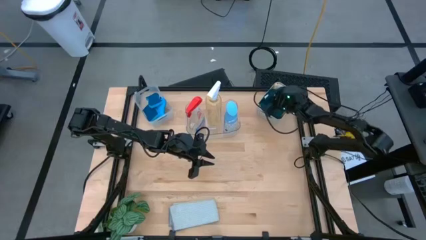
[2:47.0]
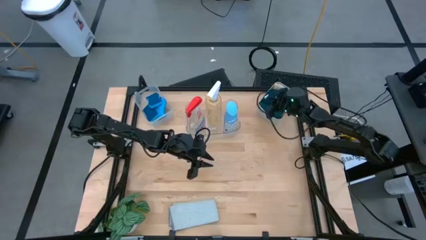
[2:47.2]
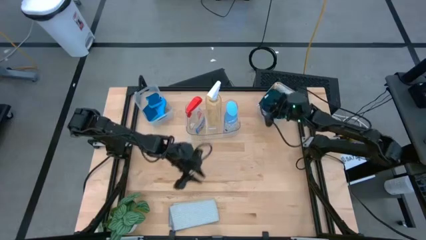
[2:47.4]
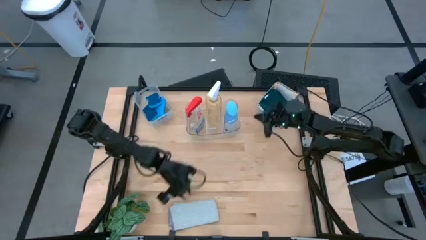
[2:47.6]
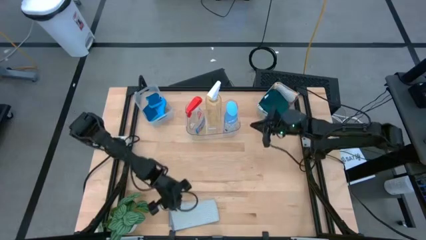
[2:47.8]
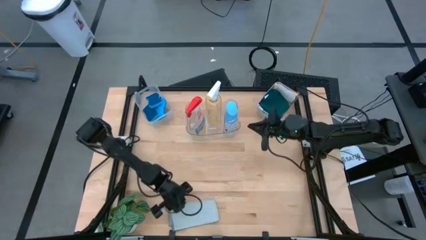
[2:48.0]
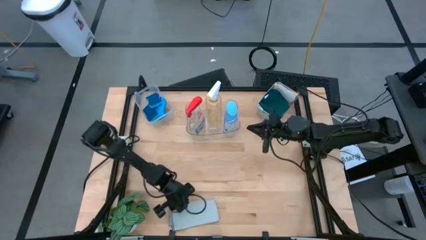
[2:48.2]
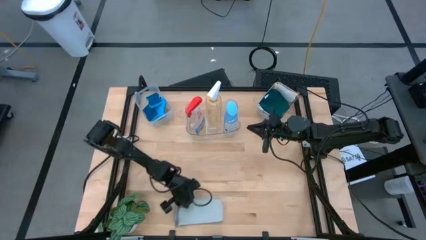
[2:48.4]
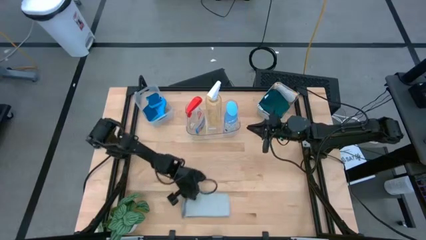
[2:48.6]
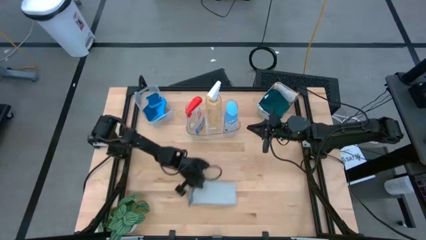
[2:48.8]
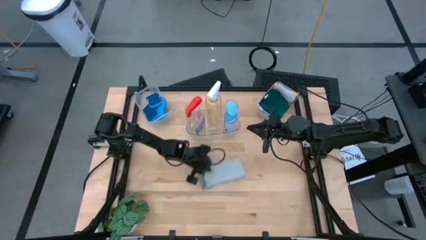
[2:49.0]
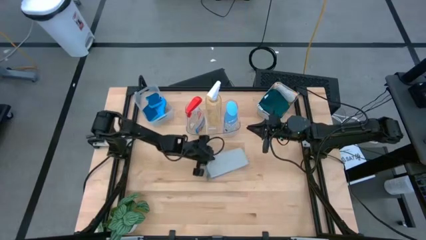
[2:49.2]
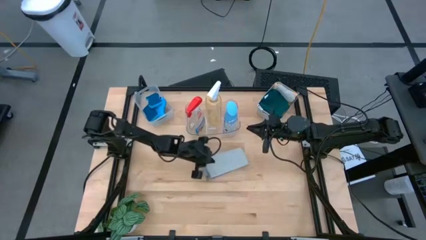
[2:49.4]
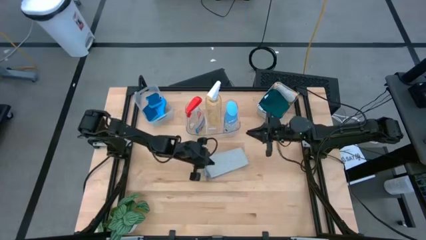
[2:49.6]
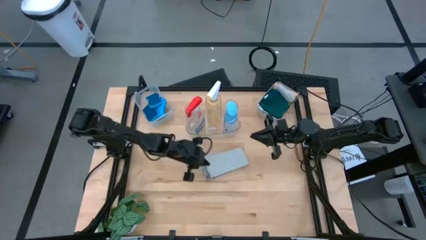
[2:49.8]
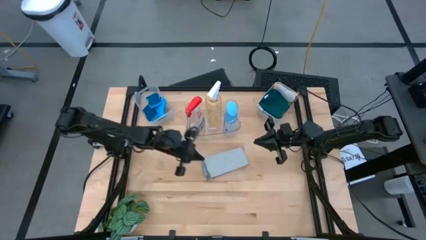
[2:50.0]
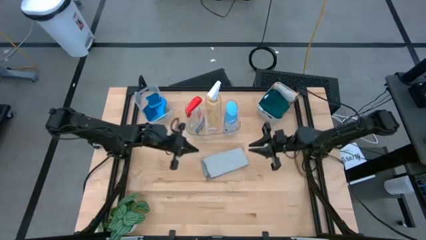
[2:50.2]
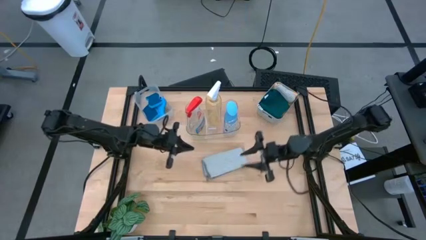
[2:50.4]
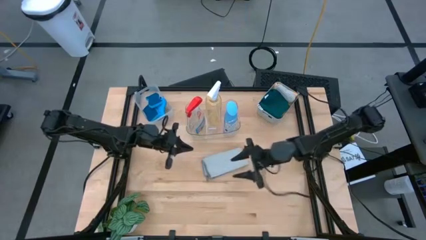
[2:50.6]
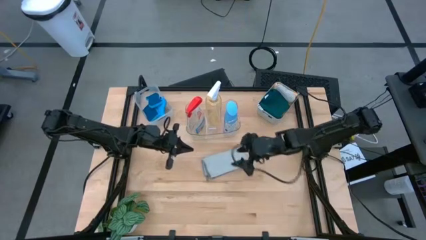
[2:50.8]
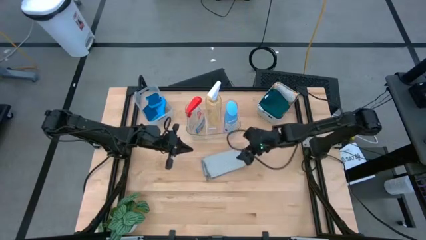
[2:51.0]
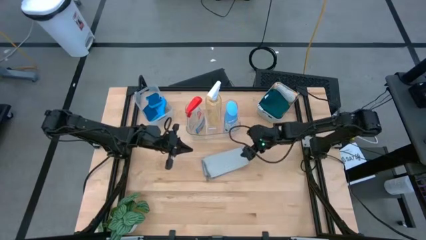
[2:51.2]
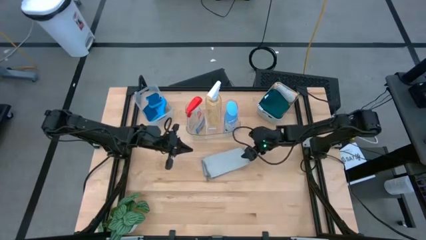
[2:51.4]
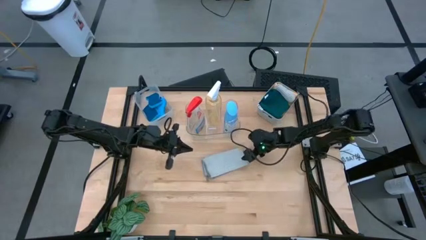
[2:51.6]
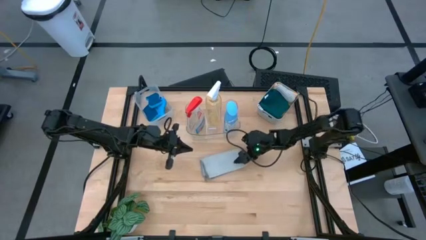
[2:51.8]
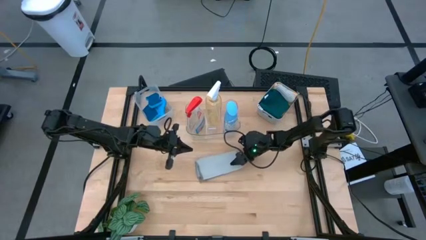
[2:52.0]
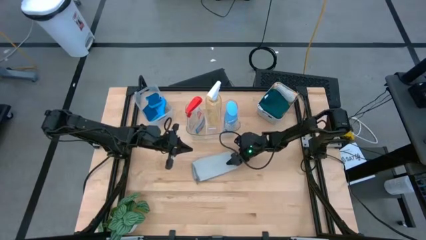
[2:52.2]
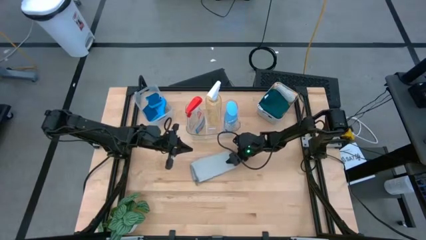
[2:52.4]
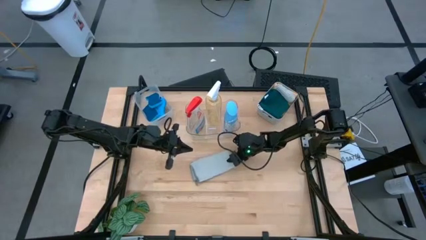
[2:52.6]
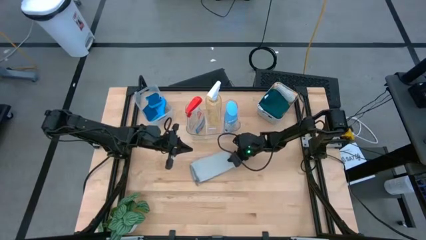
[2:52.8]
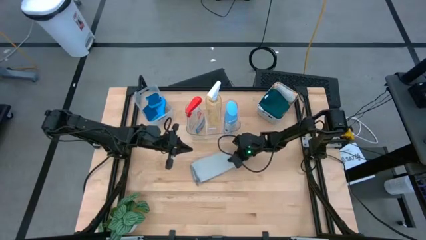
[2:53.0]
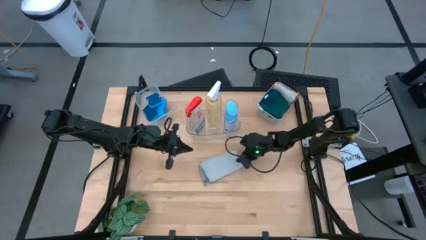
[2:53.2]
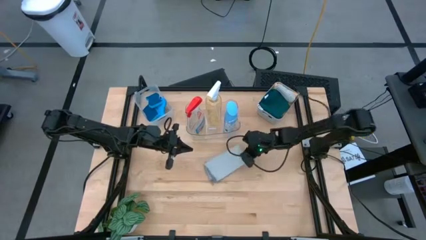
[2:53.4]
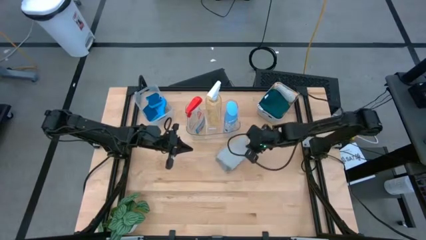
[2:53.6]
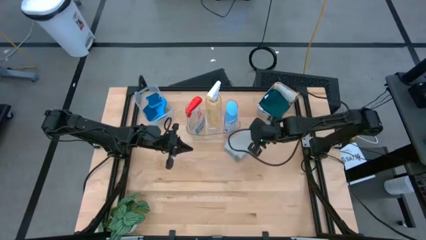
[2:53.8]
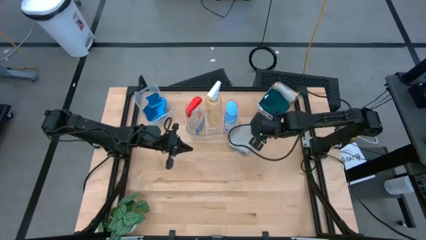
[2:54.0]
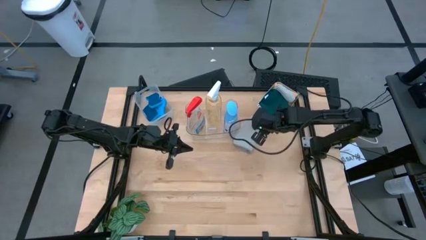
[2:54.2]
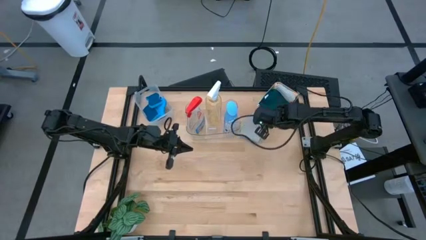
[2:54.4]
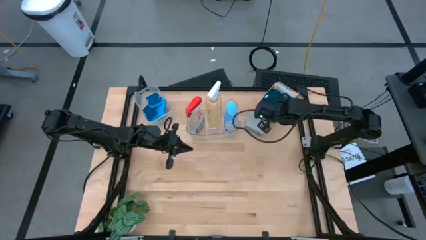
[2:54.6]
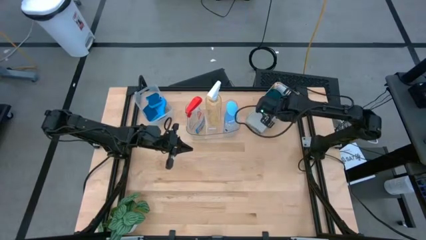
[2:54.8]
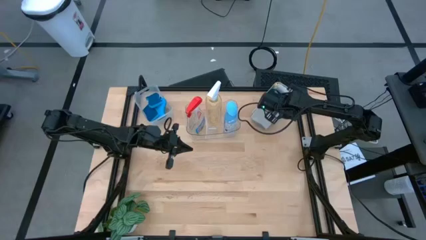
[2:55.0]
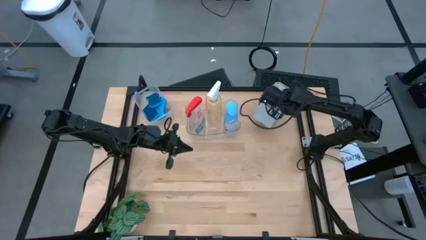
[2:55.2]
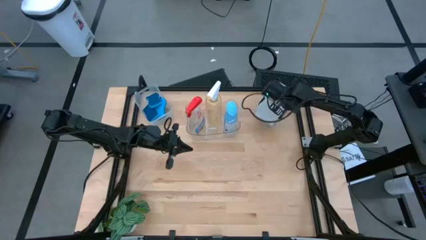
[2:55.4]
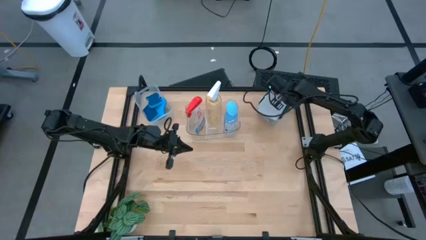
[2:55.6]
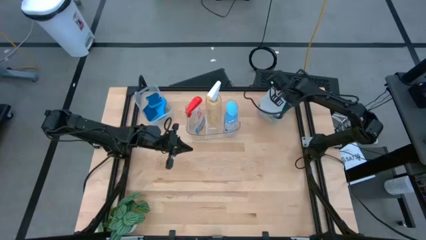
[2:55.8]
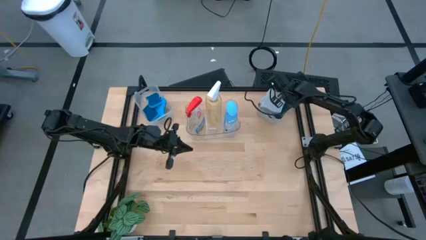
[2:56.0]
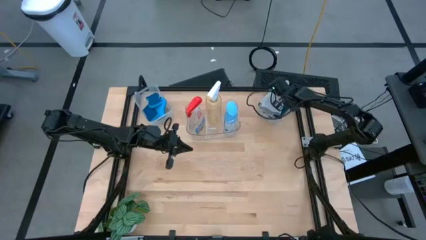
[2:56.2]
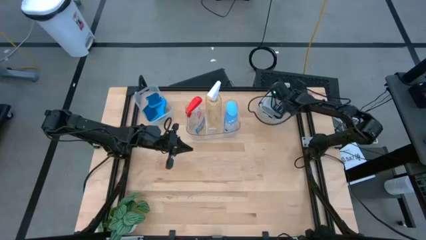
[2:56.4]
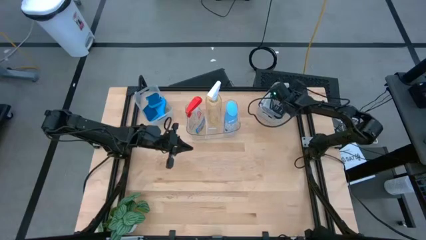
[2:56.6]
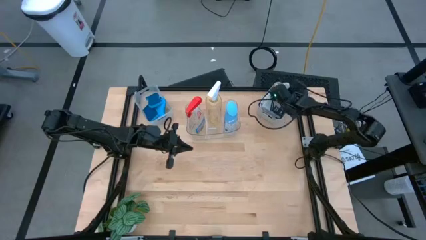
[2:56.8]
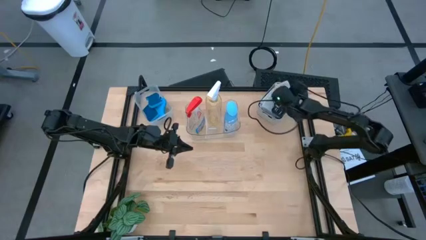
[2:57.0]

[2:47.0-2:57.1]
Task: Pick & Place Kitchen Items
Put the gray microfiber towel into the gray bin

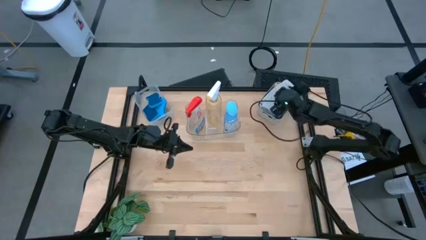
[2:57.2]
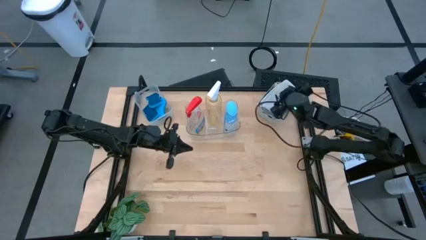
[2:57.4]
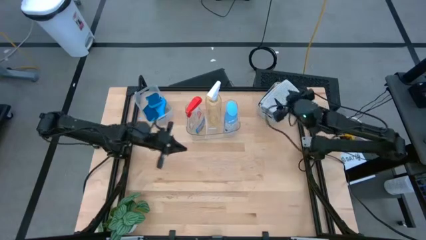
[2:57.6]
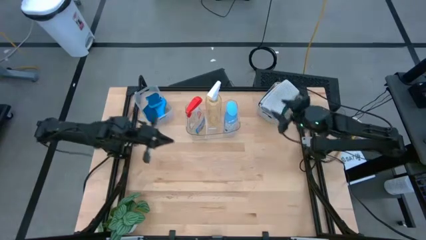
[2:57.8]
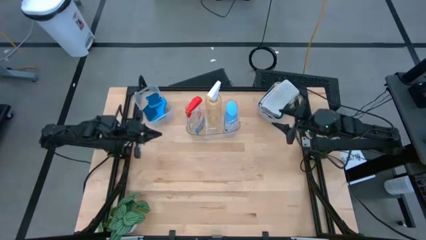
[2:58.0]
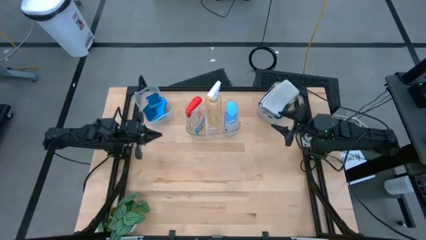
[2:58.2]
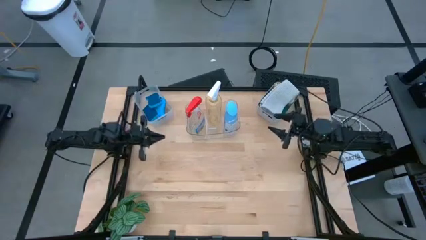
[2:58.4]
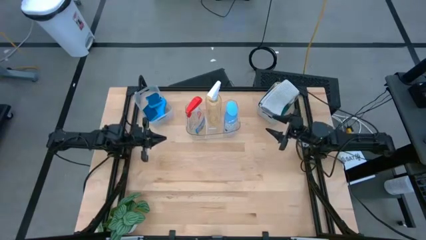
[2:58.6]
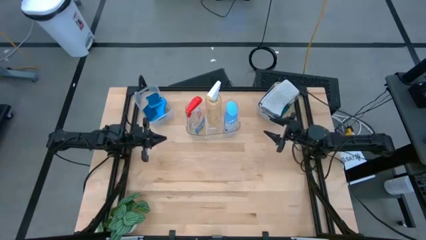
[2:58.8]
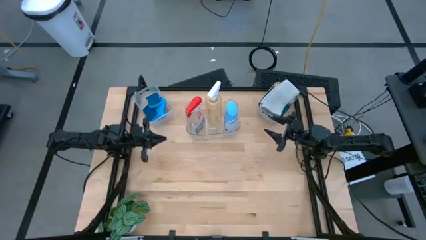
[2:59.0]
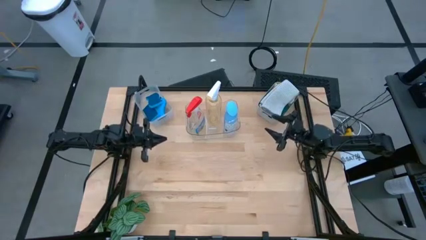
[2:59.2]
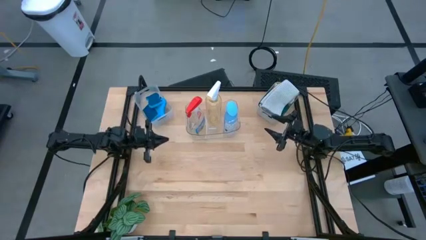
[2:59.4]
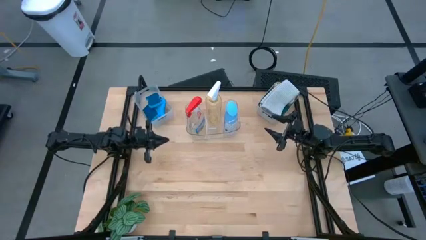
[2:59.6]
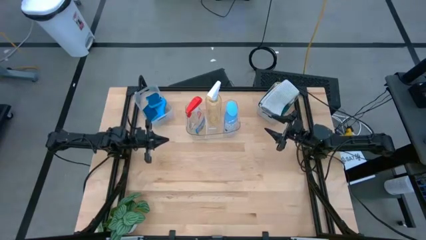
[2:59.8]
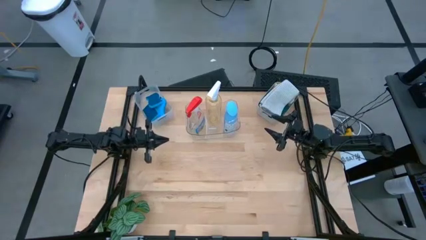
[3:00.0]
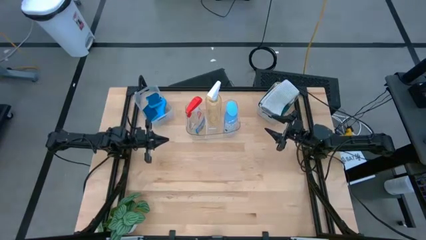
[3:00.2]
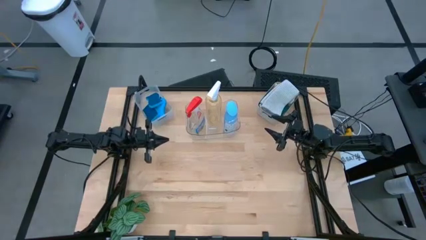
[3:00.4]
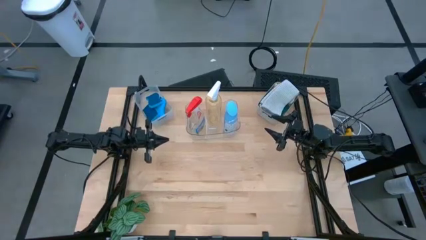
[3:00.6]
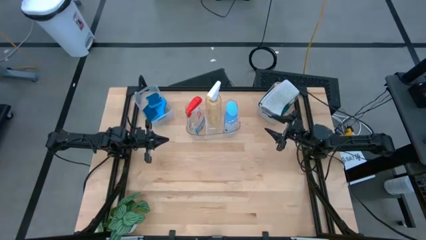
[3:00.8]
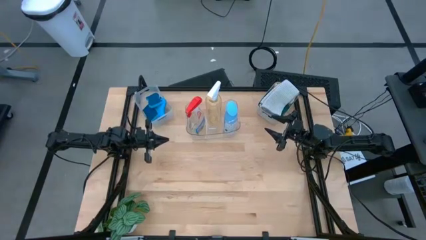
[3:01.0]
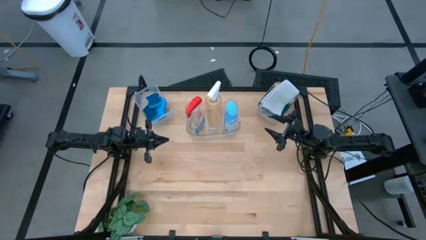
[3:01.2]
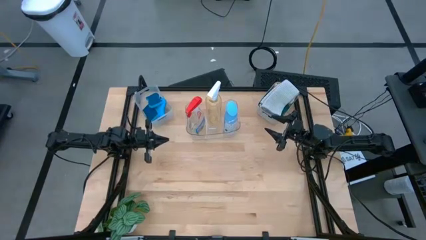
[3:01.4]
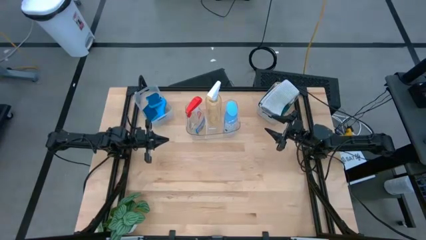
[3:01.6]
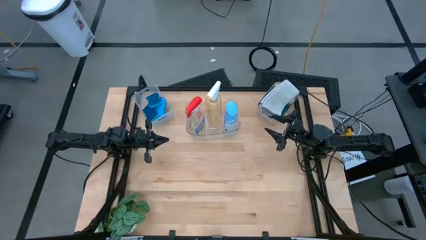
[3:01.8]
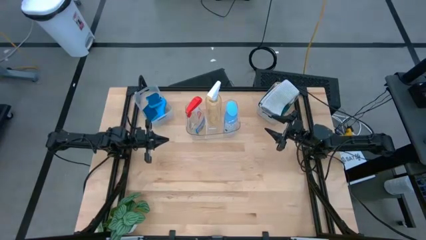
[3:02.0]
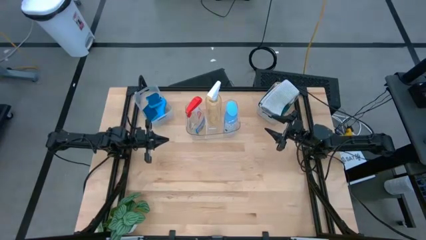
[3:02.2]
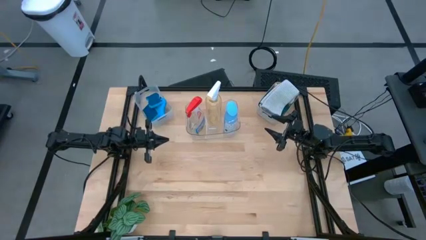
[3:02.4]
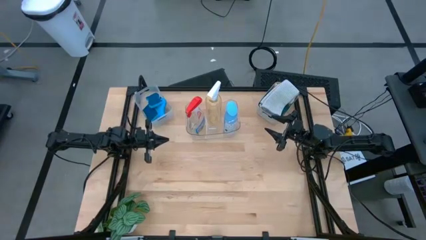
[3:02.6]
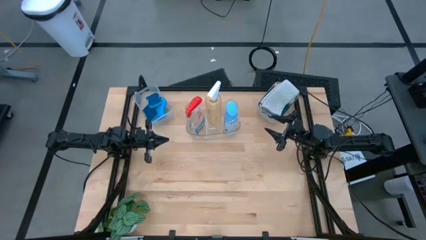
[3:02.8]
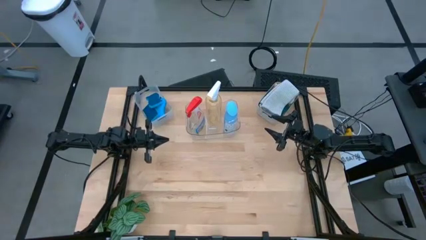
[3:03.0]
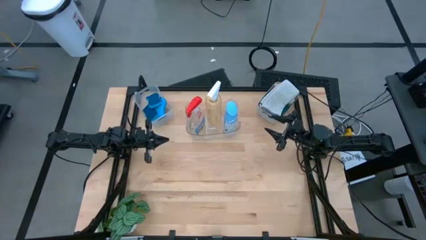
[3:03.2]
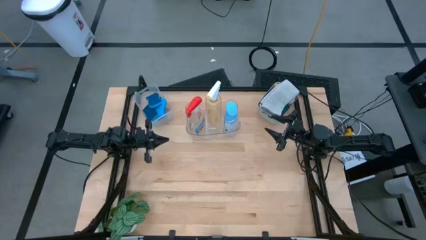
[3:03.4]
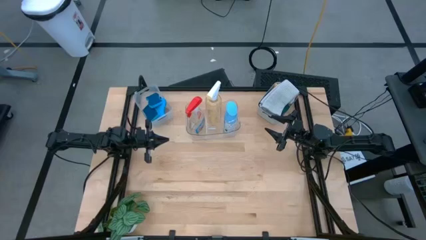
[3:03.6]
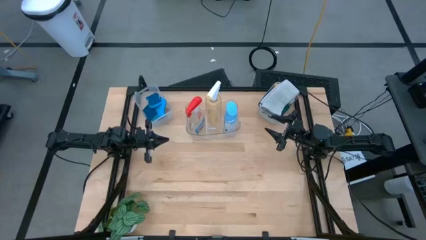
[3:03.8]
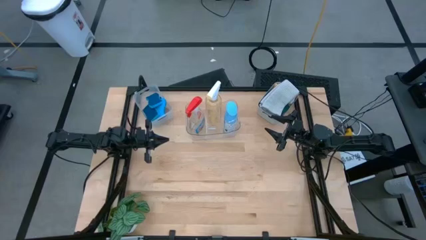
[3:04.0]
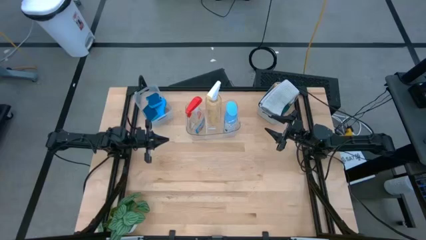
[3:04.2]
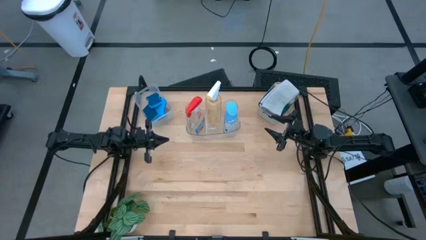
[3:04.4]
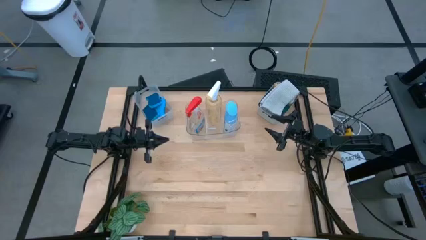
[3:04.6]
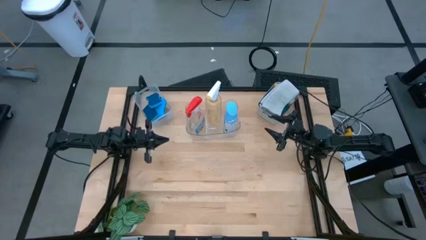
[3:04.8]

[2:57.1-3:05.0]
Return to Home Position
